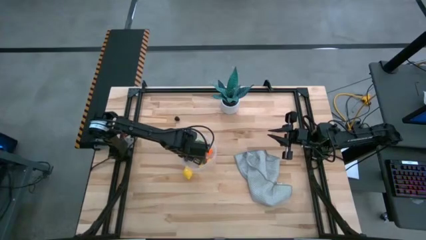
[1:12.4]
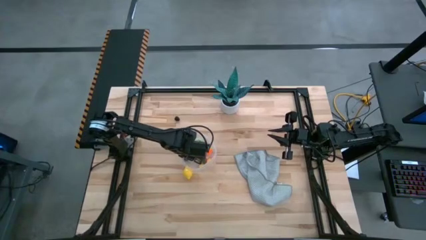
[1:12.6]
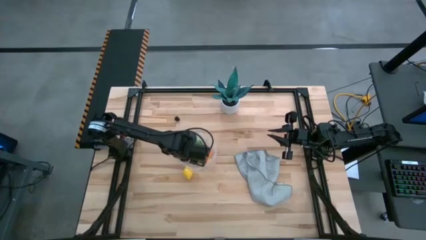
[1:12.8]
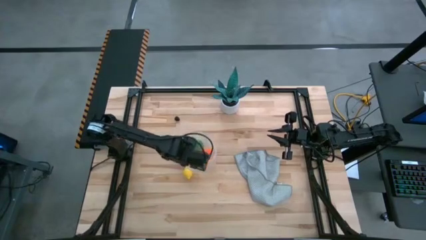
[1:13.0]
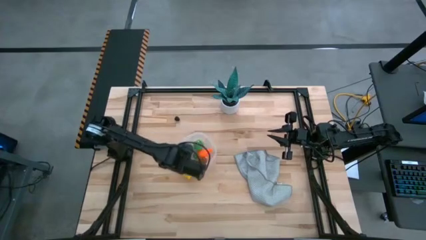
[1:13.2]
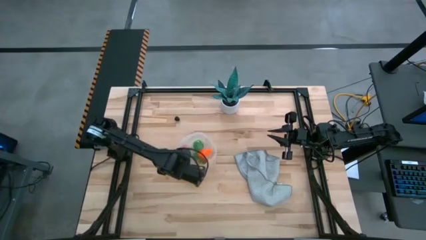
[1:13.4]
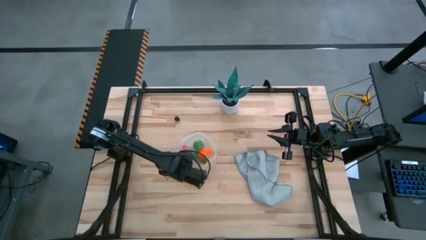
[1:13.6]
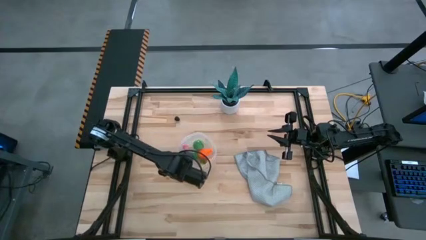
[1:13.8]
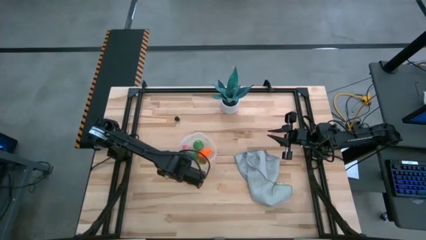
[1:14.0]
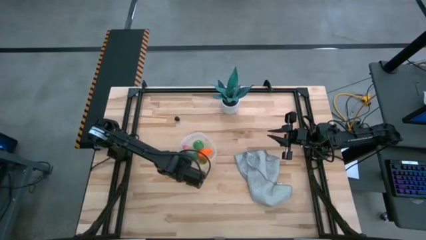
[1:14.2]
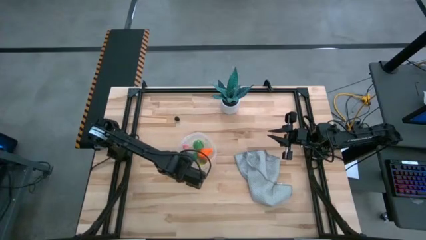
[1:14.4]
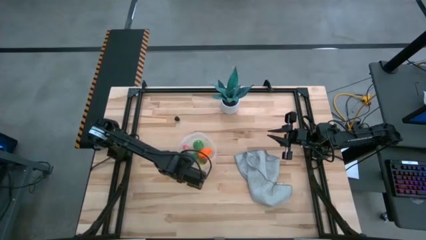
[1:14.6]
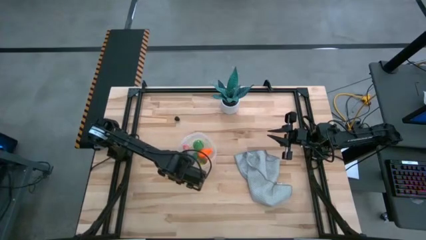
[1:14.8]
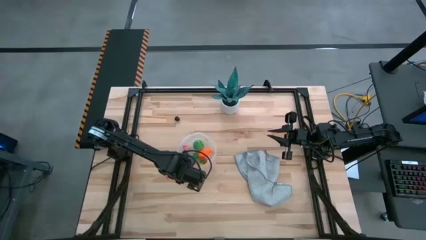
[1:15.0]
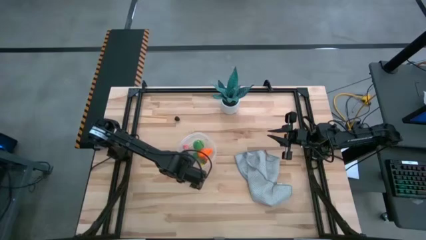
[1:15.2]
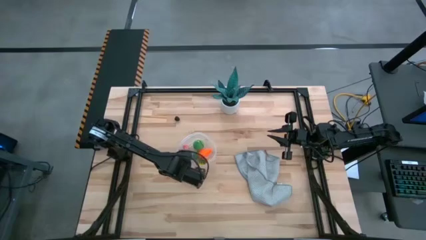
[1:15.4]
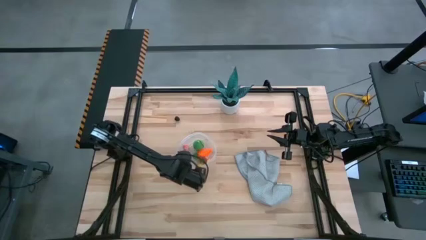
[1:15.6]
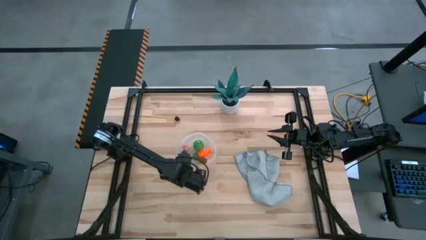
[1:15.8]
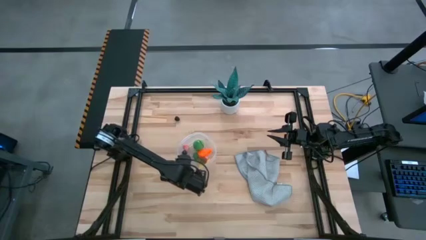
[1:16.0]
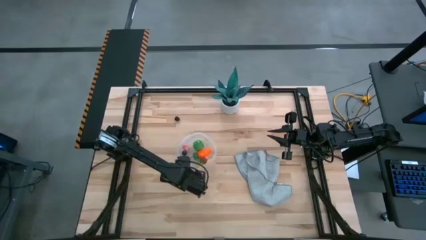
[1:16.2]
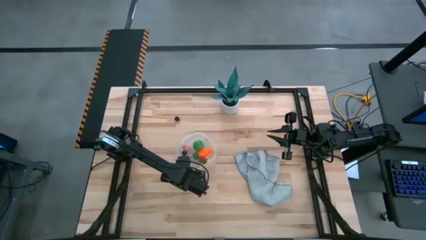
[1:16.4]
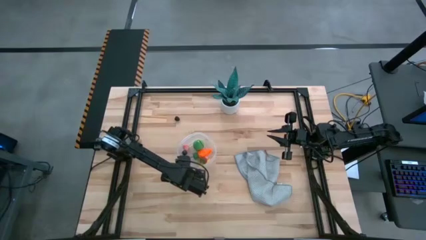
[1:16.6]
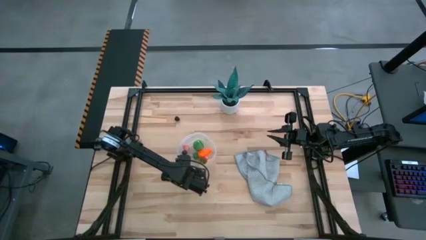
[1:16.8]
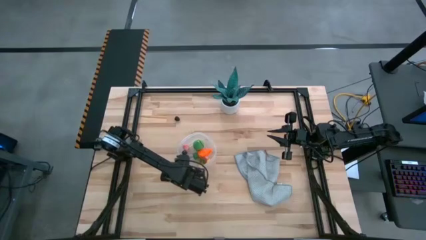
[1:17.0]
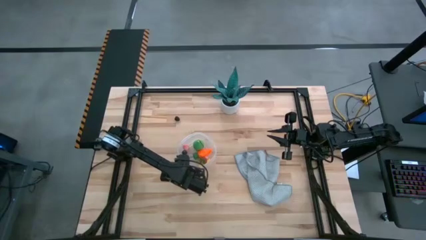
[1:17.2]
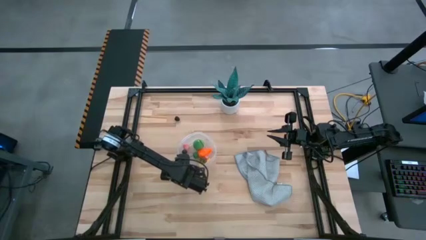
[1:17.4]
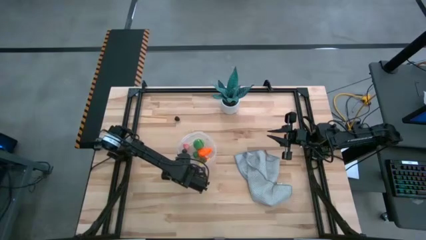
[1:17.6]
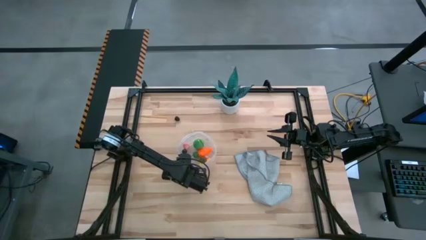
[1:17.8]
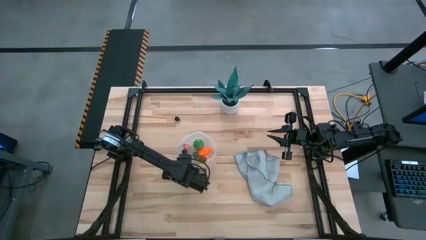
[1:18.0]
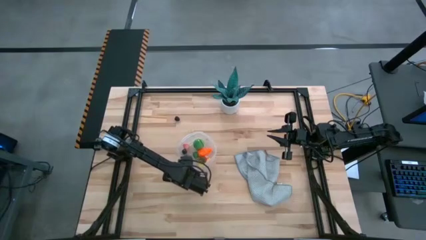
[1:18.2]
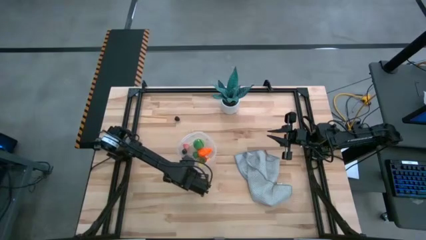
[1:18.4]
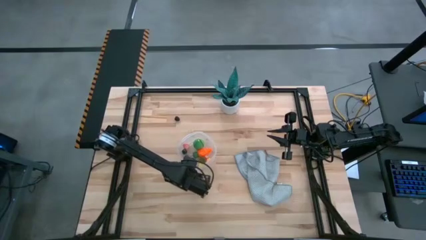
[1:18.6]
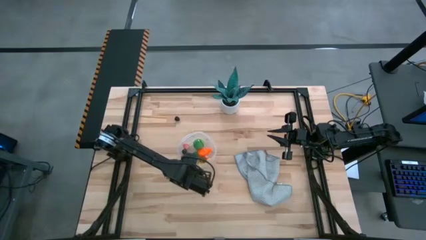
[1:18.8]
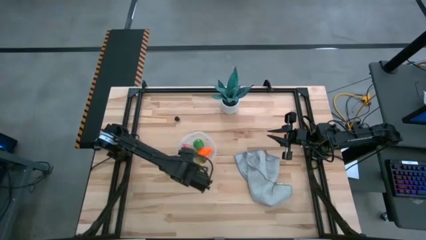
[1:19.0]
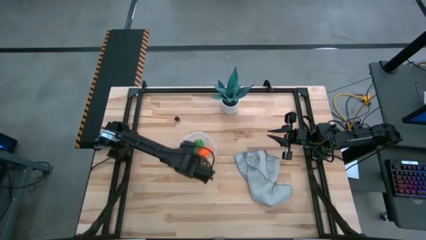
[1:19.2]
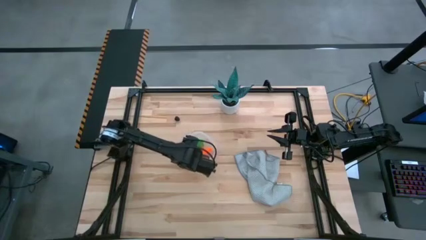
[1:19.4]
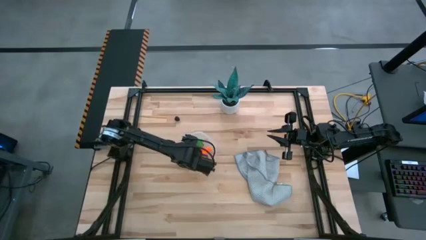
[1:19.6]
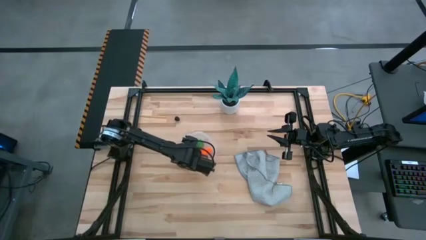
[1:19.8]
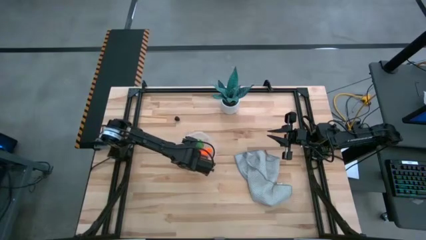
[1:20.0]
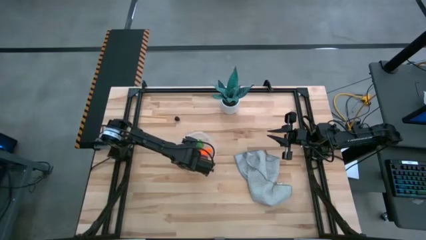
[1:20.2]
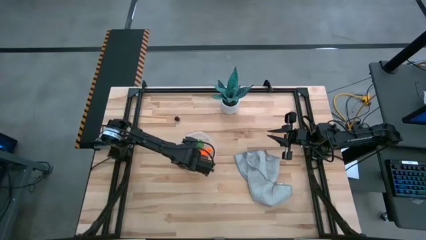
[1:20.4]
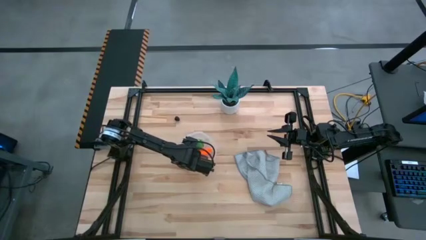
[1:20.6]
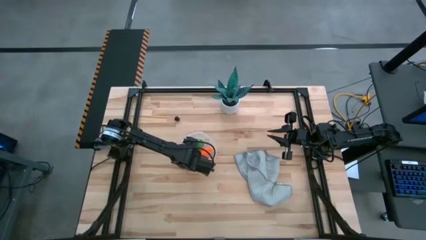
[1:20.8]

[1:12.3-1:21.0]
Task: Pick and placing Produce into tupperware
Put the yellow lemon into the transparent bin

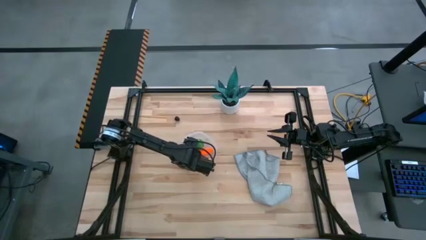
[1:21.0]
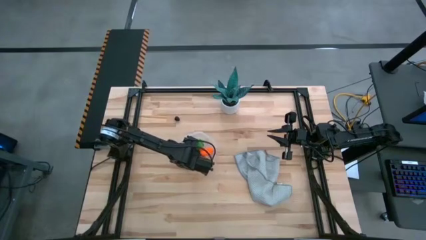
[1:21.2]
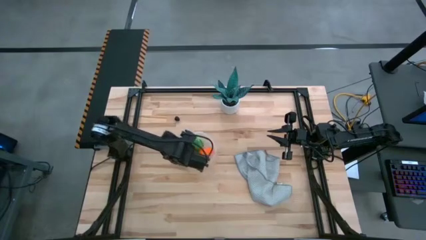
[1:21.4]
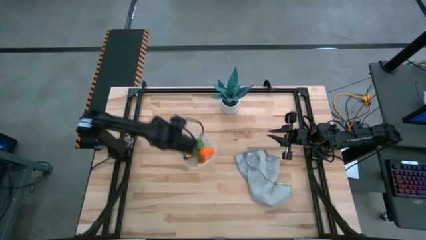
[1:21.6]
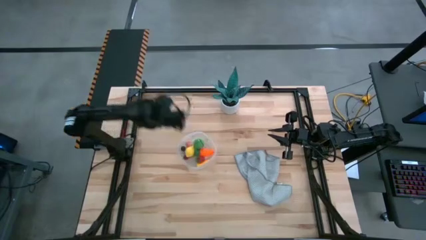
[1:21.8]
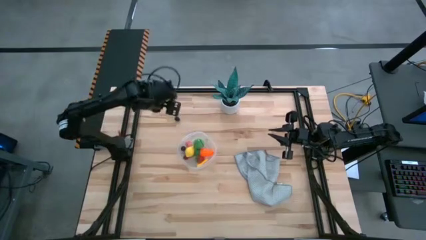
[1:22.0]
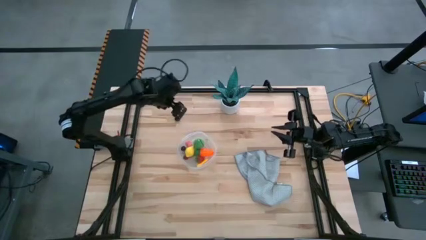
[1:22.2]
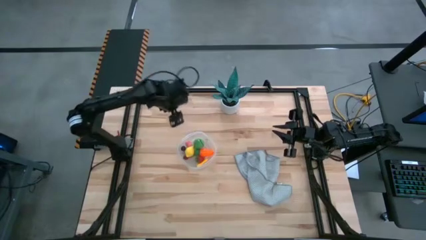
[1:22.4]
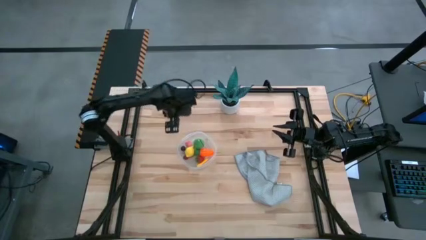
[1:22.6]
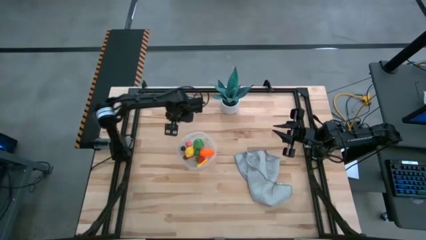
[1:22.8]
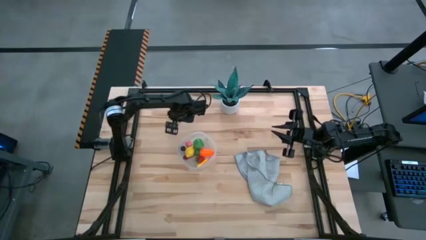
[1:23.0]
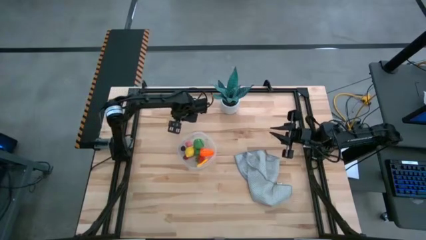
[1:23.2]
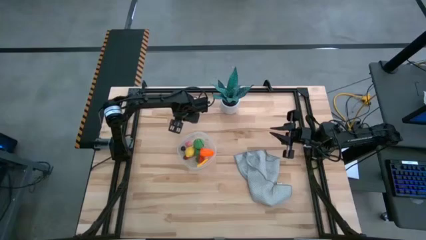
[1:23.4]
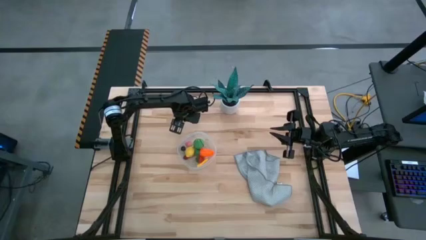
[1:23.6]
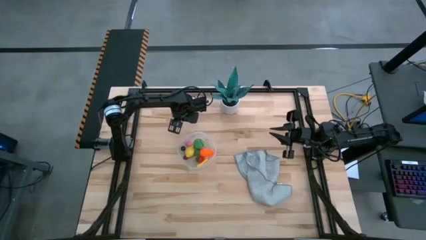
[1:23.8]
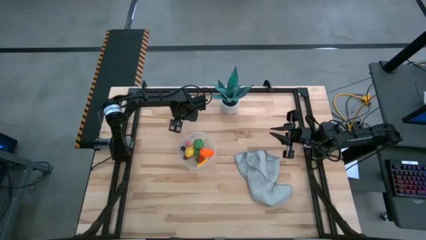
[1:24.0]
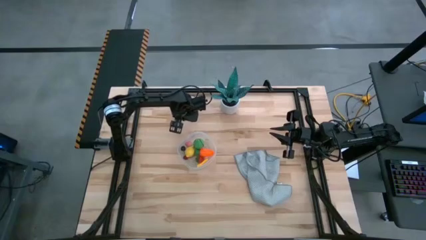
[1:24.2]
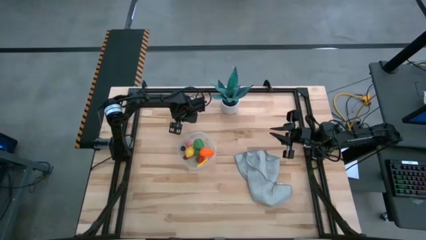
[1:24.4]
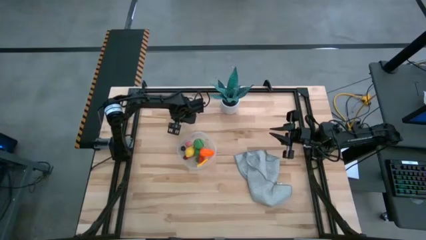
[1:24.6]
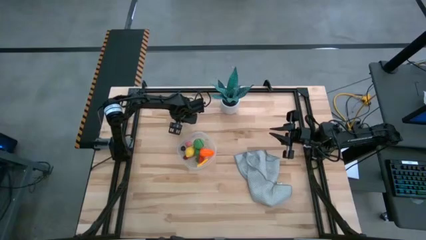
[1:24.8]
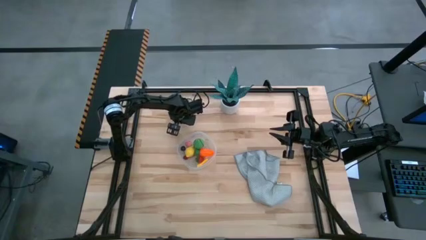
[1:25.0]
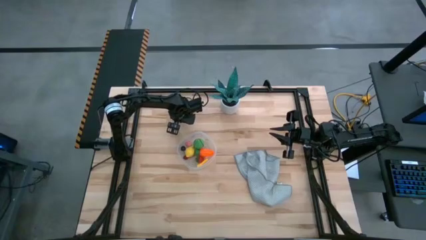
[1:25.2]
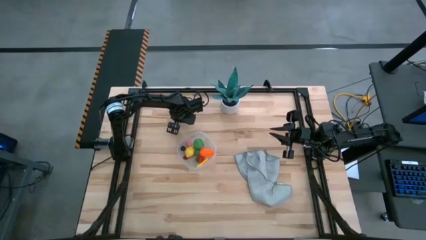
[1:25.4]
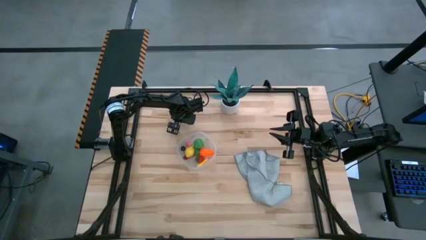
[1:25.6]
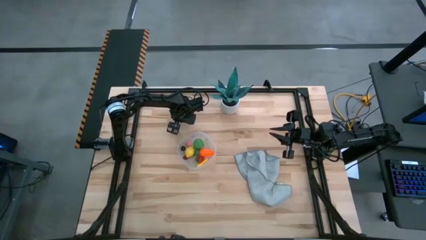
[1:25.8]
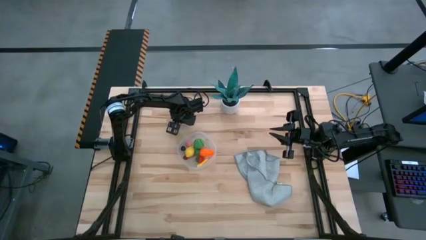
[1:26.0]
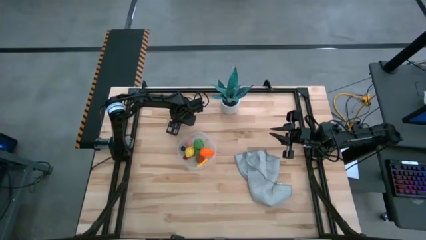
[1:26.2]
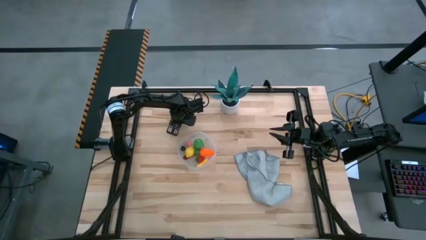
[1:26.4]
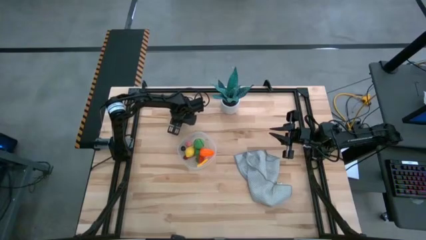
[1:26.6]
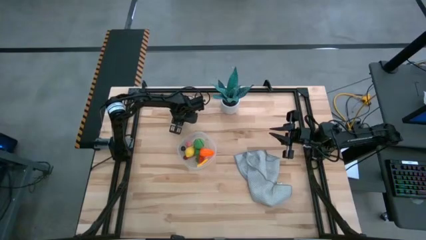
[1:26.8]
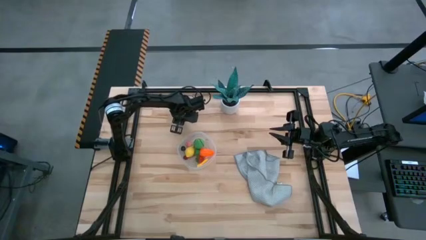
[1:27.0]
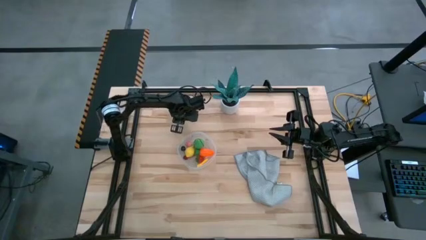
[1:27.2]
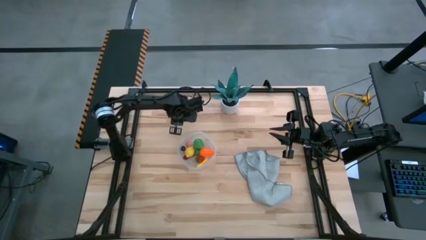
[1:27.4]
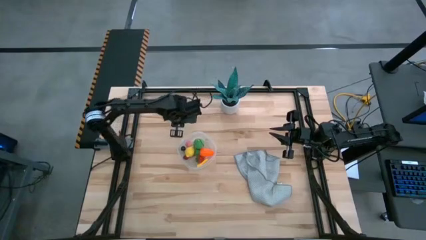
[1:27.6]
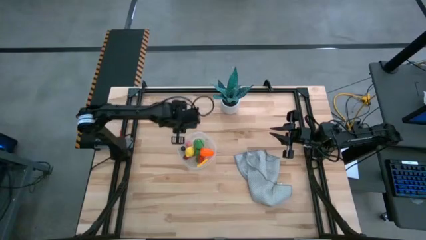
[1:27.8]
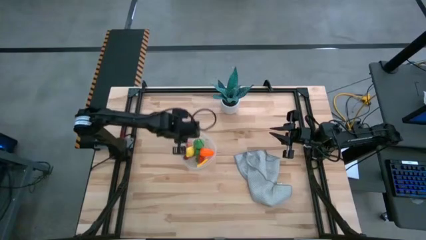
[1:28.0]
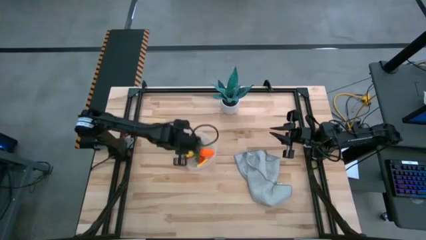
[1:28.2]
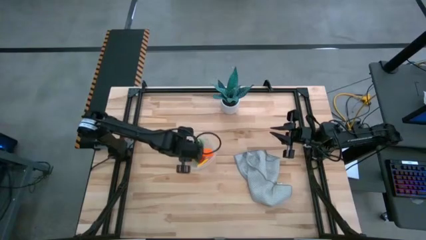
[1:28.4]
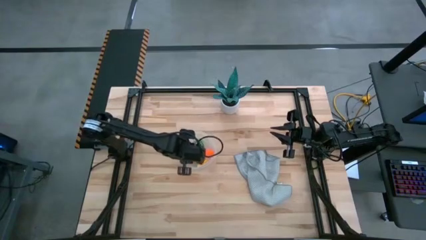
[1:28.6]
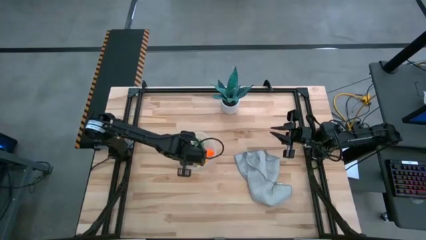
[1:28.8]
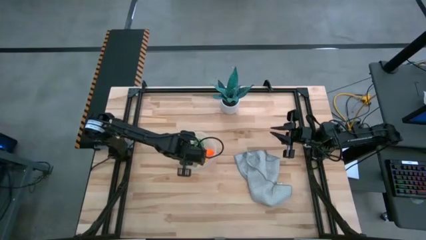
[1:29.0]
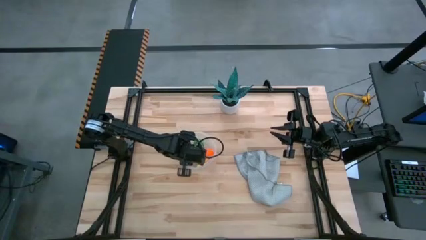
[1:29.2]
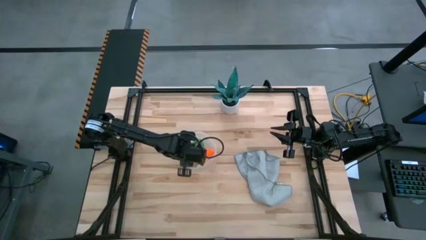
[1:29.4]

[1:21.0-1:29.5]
Put the black raspberry into the transparent bin
